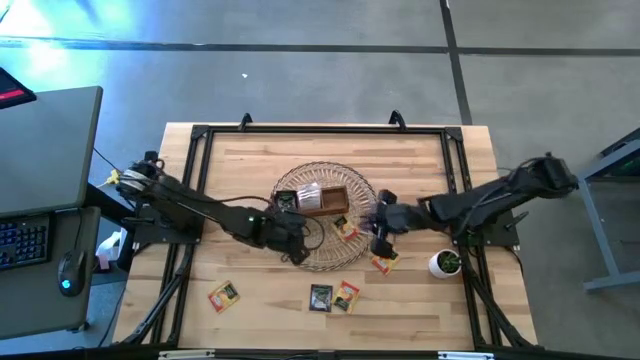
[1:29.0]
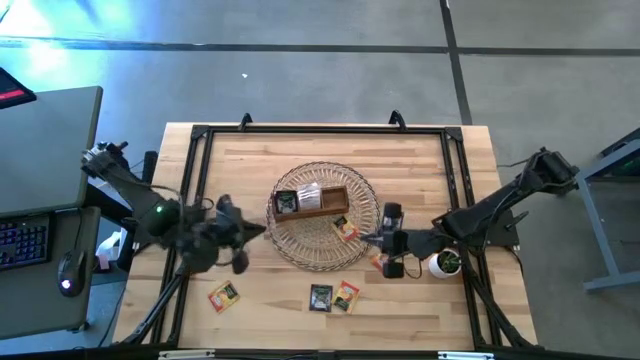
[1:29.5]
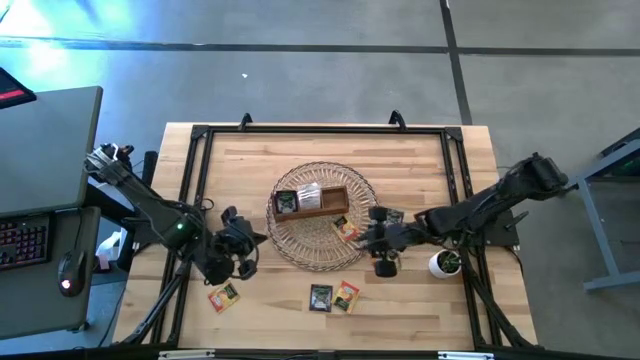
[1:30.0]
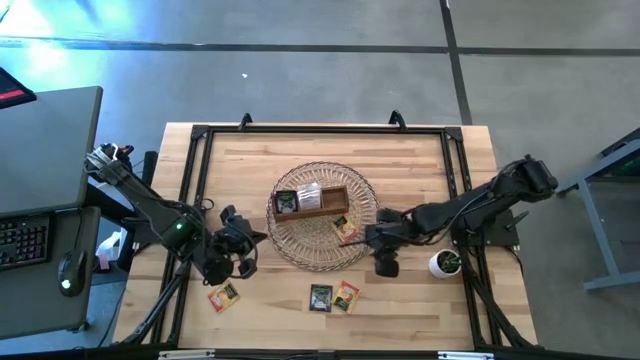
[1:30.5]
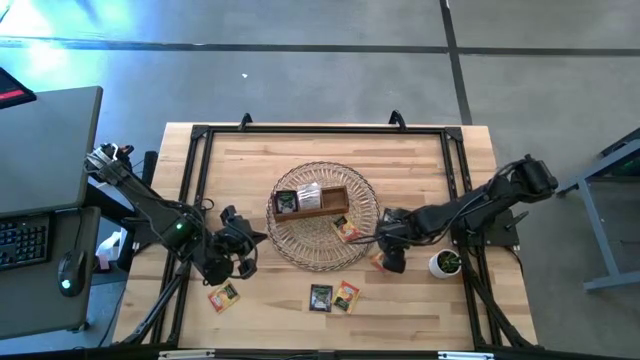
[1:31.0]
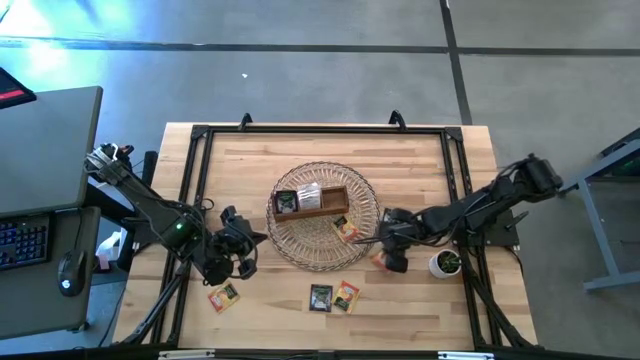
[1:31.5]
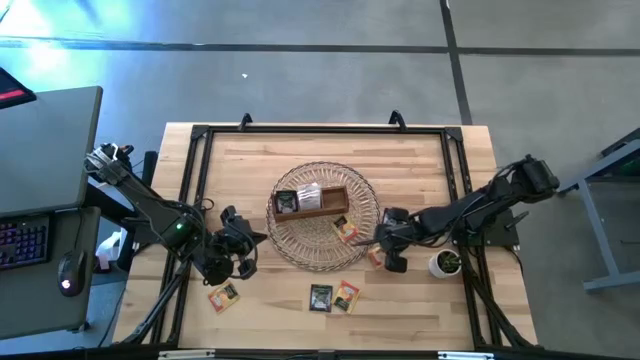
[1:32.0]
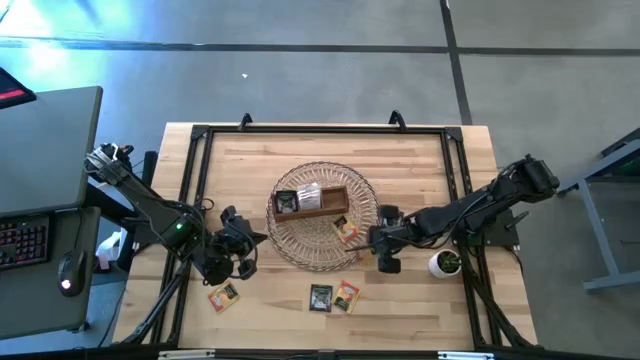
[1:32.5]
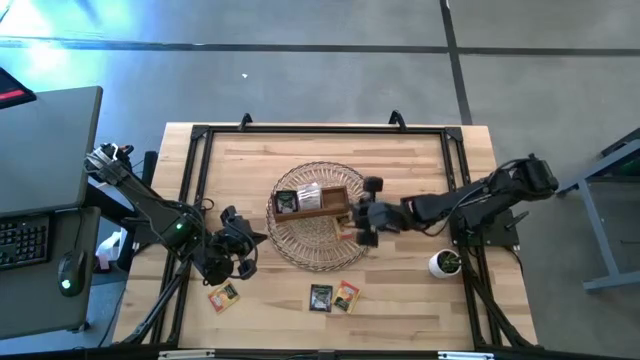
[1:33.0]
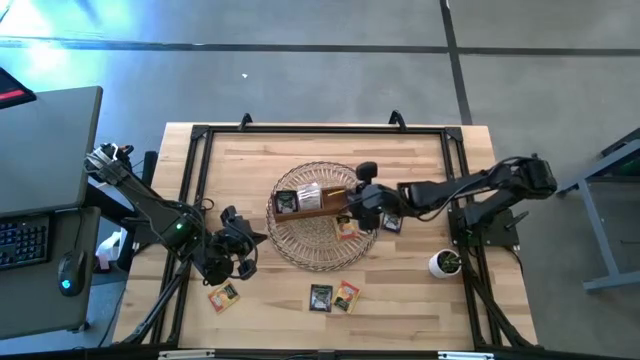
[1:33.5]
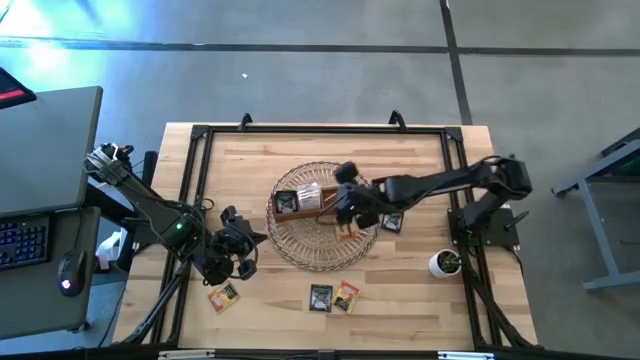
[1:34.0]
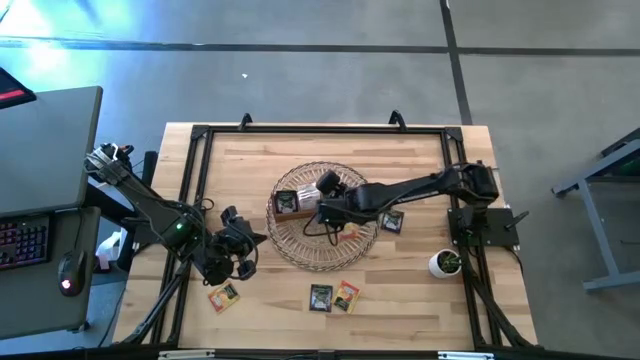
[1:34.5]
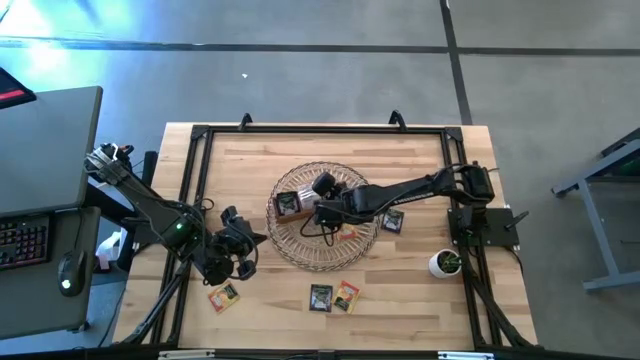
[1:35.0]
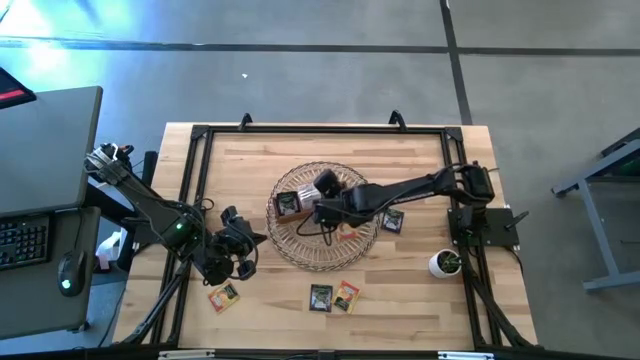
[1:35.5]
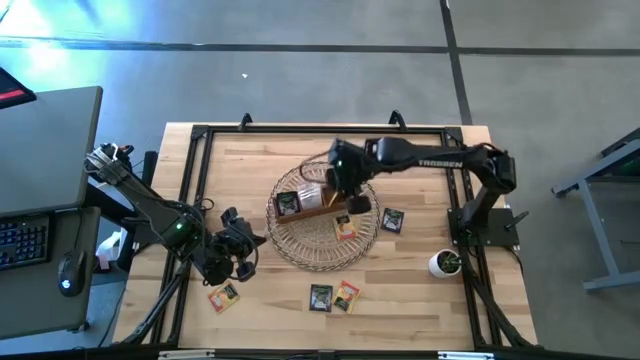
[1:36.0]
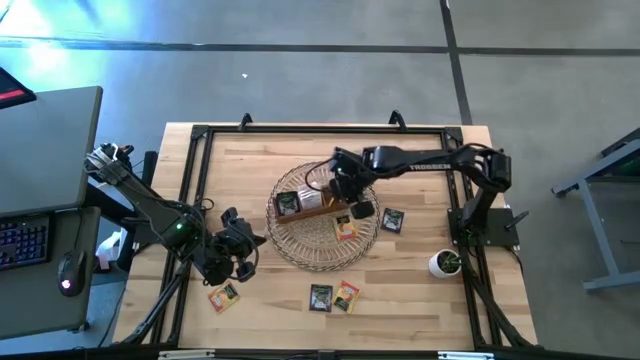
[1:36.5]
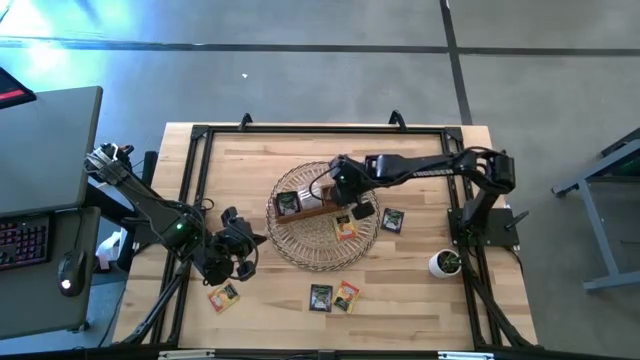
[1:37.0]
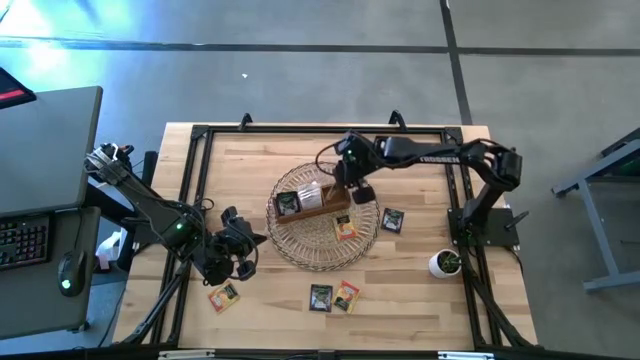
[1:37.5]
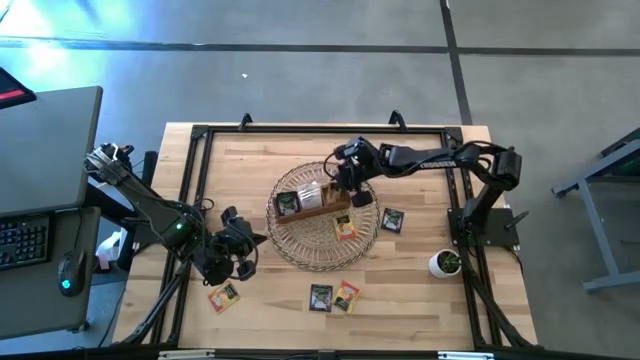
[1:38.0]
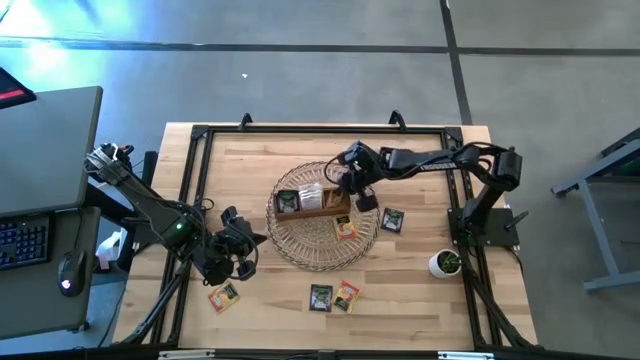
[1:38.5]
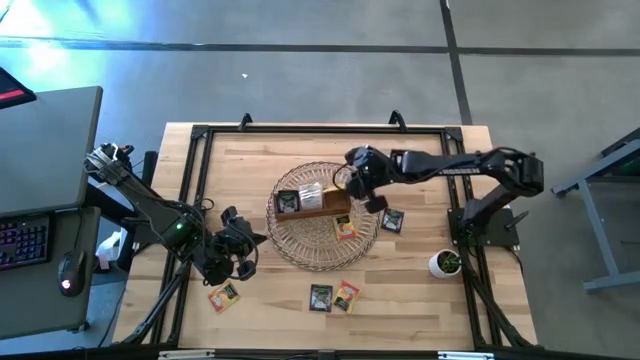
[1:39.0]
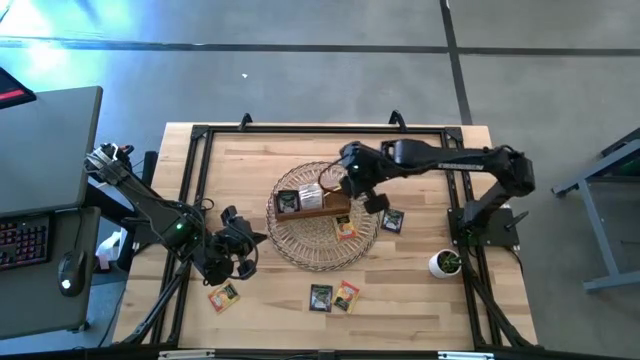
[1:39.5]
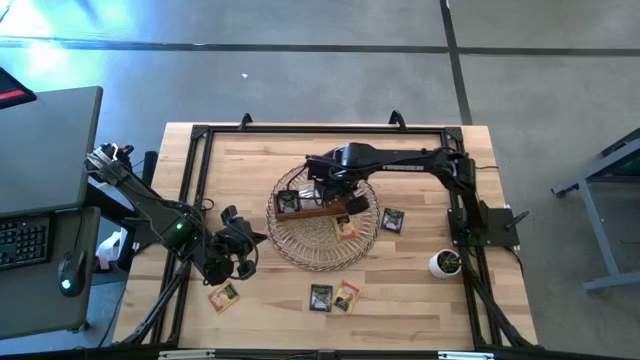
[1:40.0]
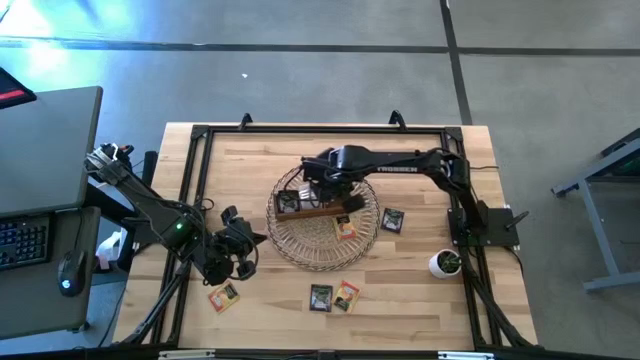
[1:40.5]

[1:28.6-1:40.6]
Task: Pick & Place Tea
Put the yellow tea bag into the right section of the brown wooden organizer

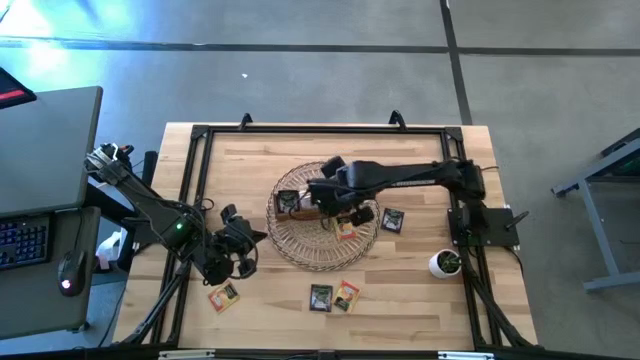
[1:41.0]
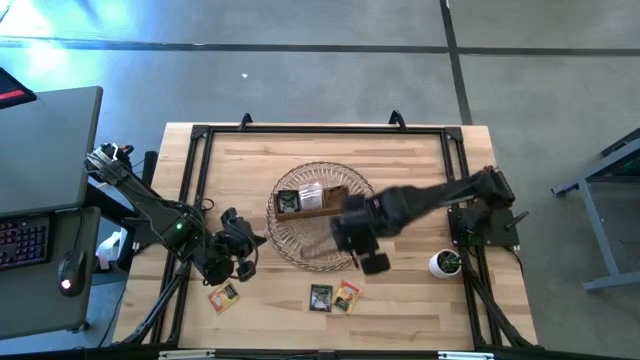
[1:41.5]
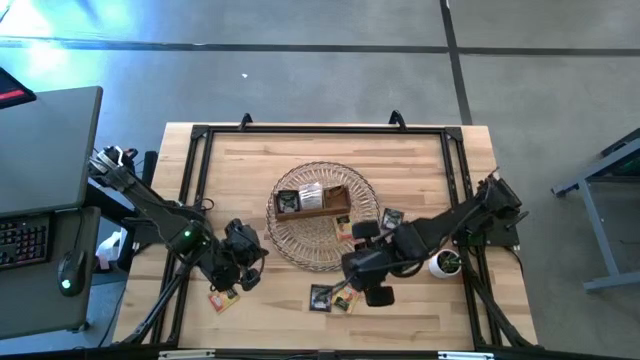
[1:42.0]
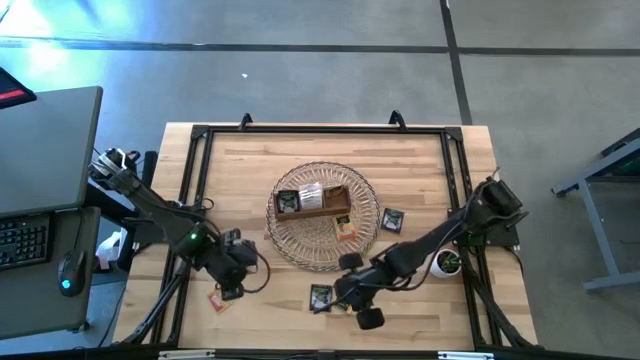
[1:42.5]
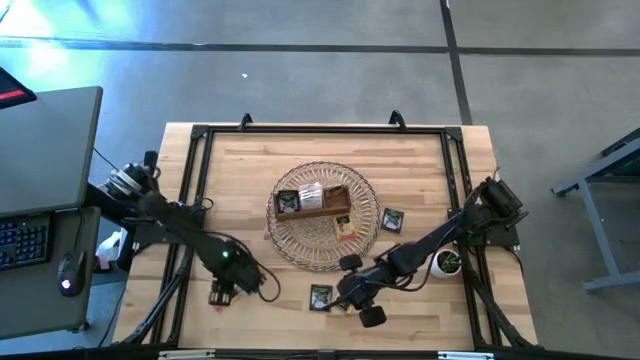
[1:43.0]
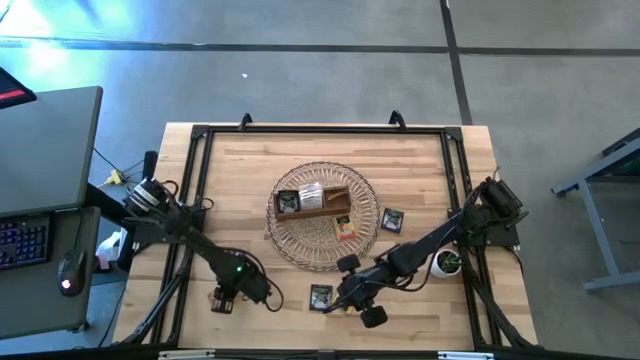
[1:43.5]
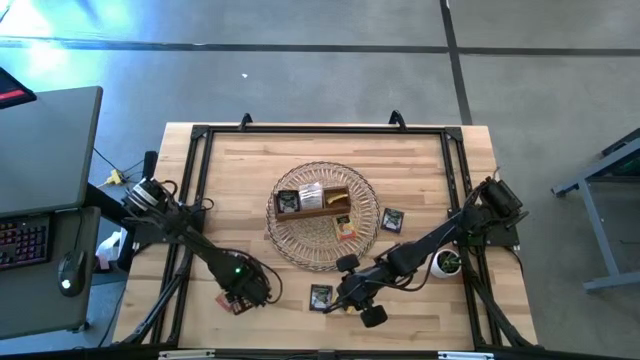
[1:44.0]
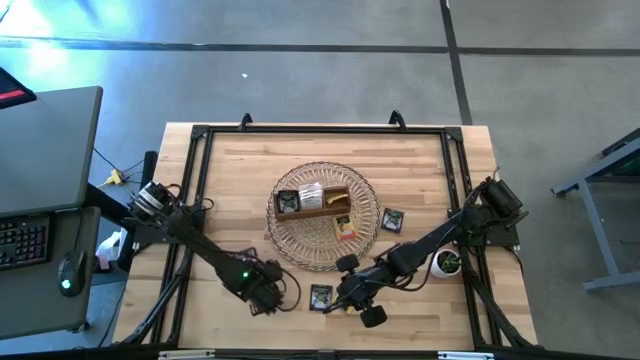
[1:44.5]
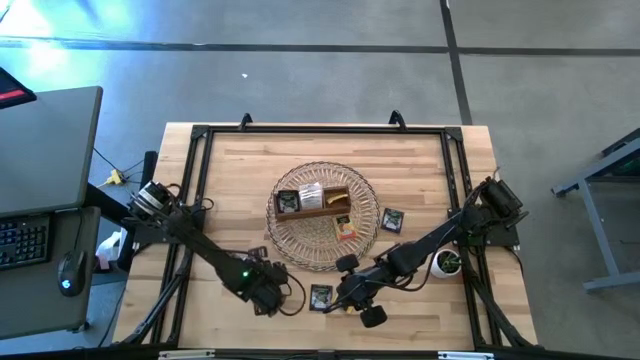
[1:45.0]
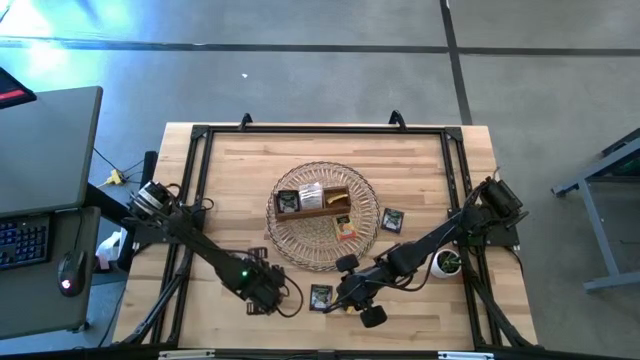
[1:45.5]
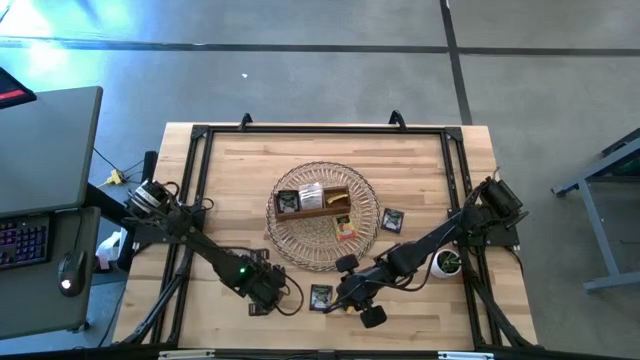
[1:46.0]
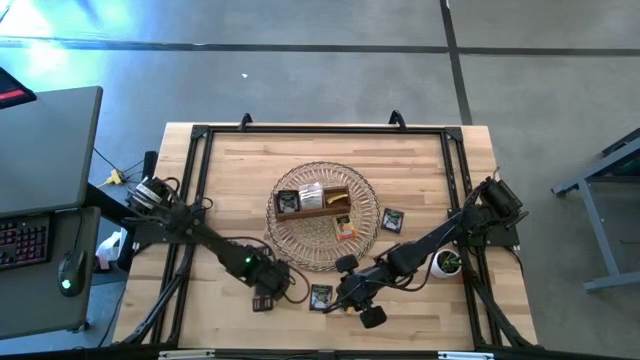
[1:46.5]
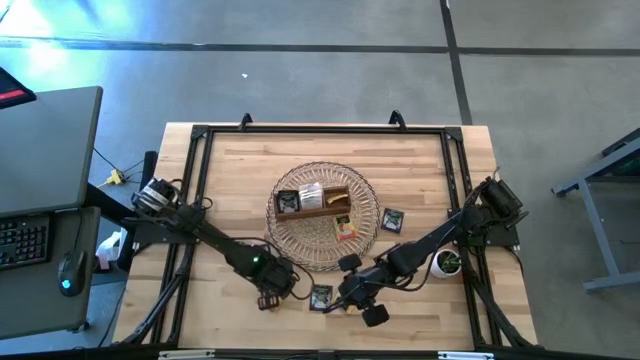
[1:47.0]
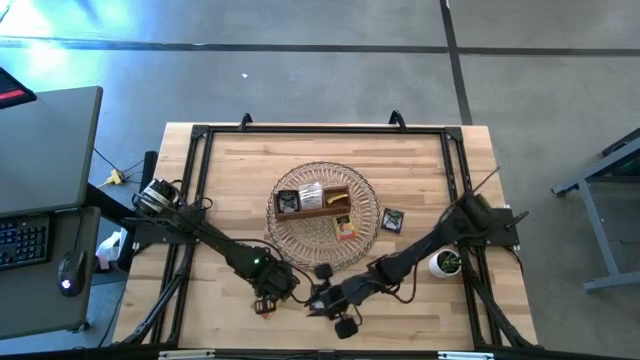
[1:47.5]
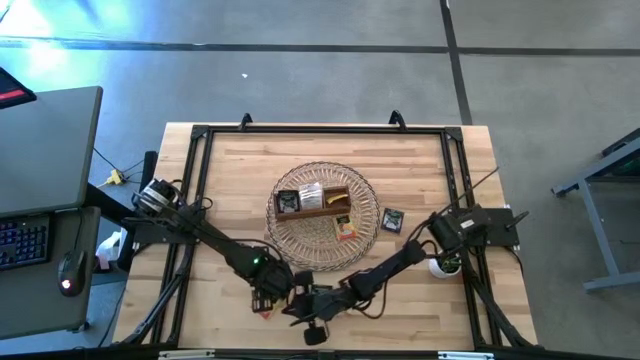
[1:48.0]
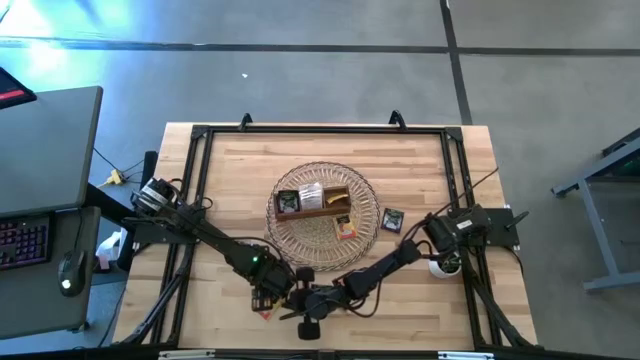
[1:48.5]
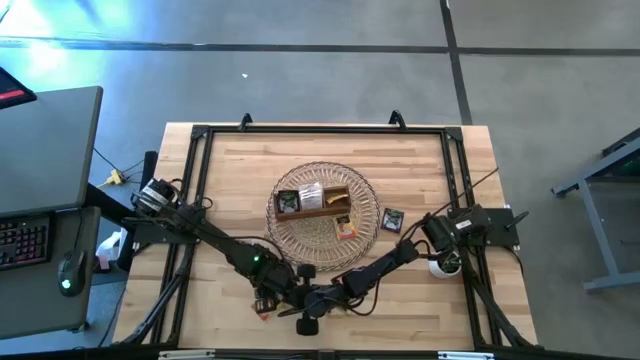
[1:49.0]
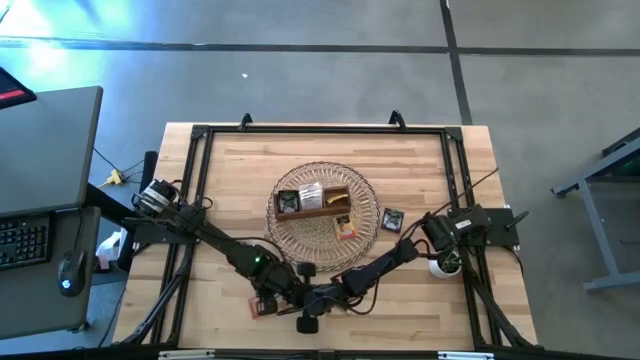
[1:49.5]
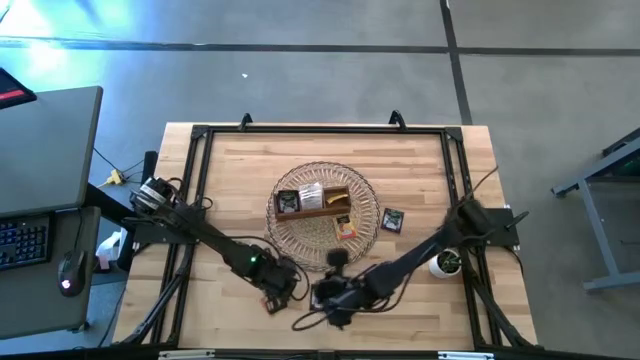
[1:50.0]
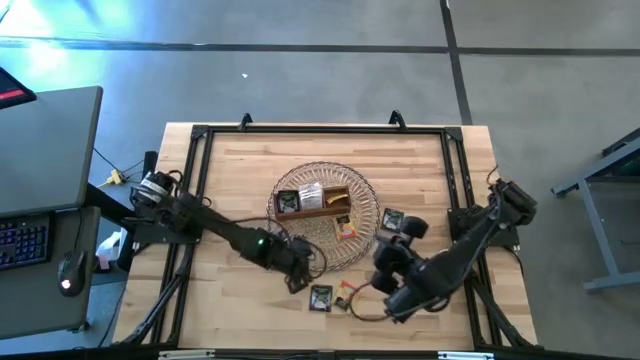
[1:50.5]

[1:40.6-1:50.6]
Put the yellow tea bag into the right section of the brown wooden organizer
